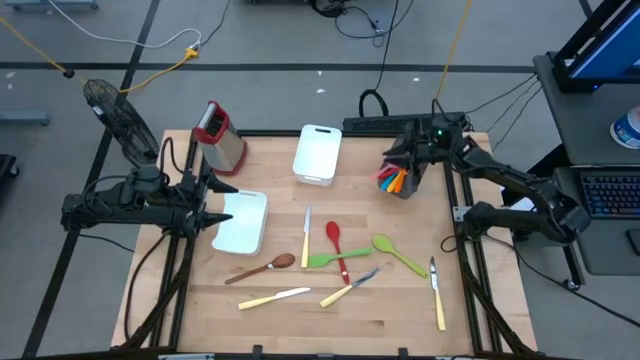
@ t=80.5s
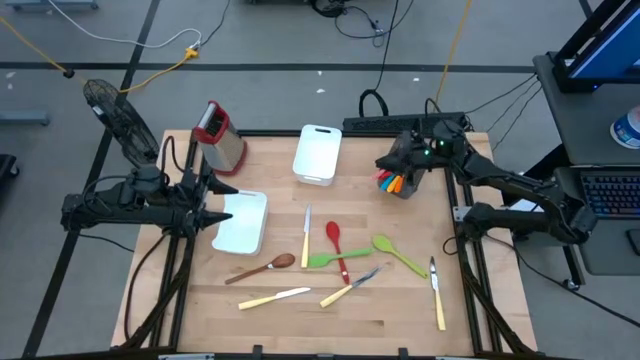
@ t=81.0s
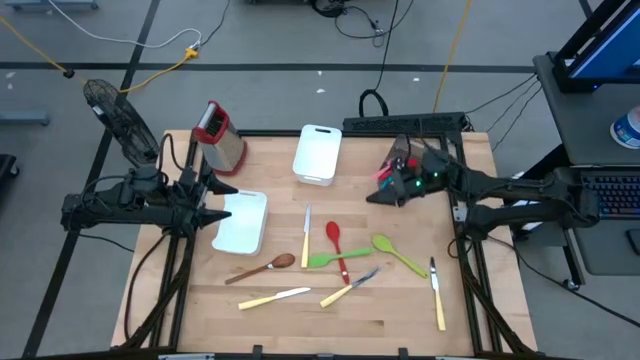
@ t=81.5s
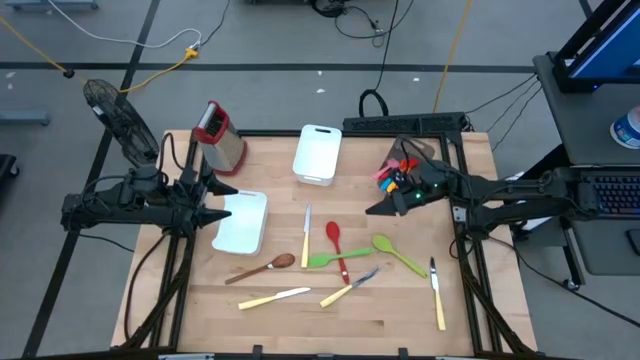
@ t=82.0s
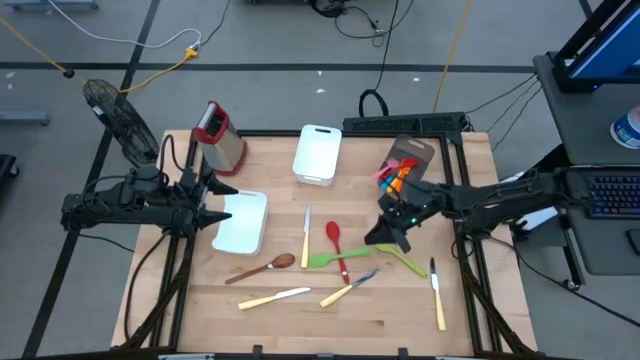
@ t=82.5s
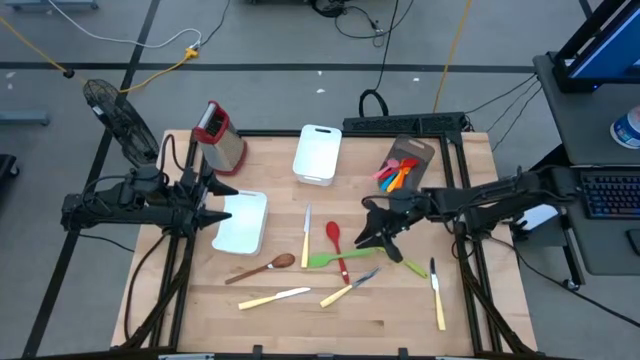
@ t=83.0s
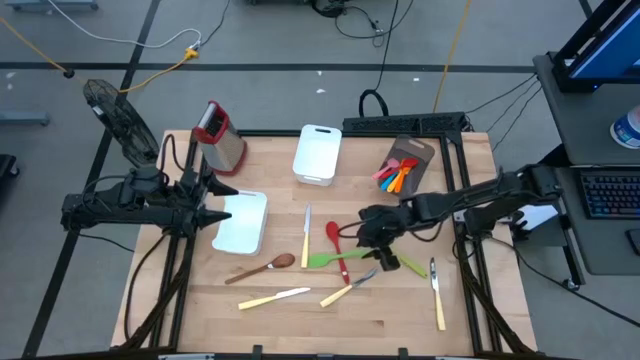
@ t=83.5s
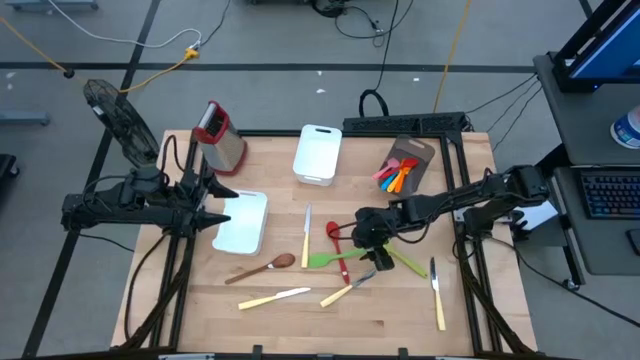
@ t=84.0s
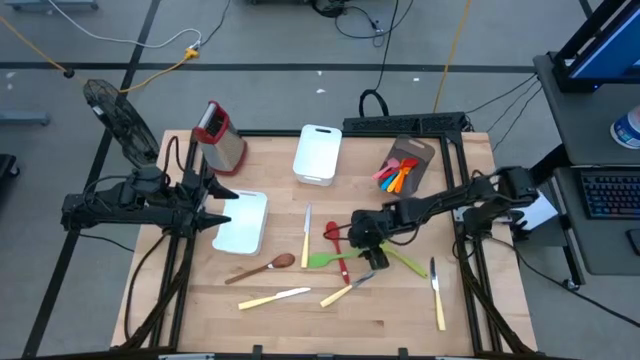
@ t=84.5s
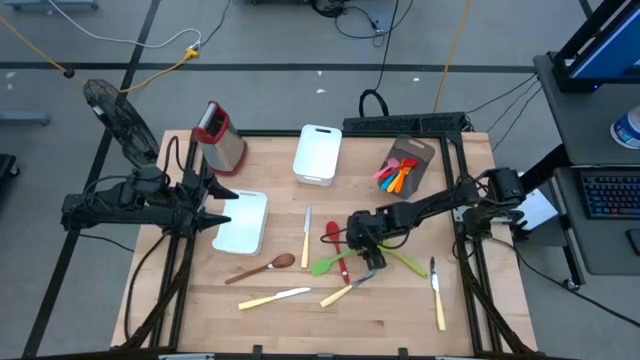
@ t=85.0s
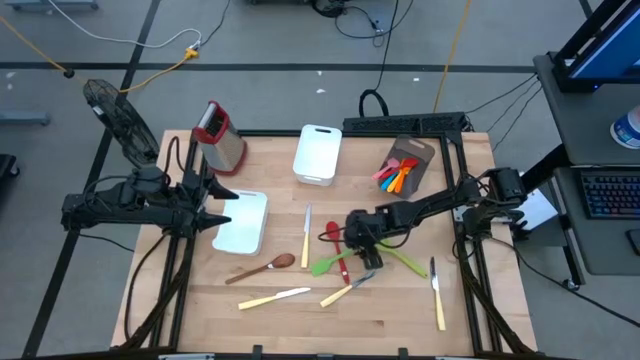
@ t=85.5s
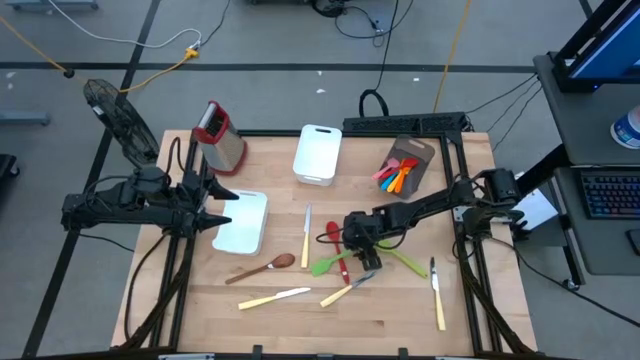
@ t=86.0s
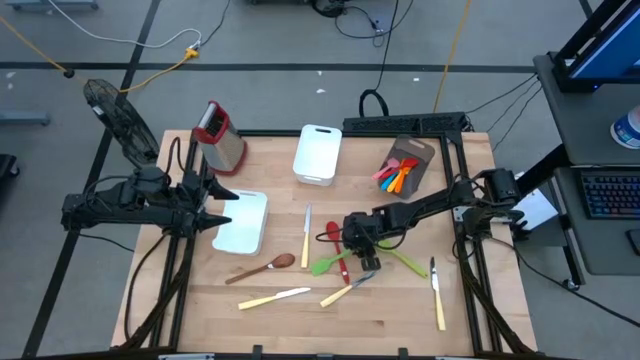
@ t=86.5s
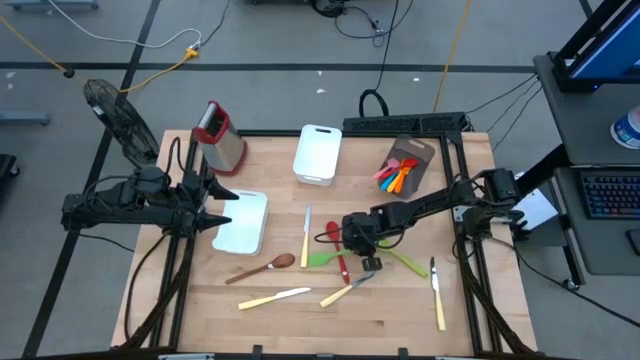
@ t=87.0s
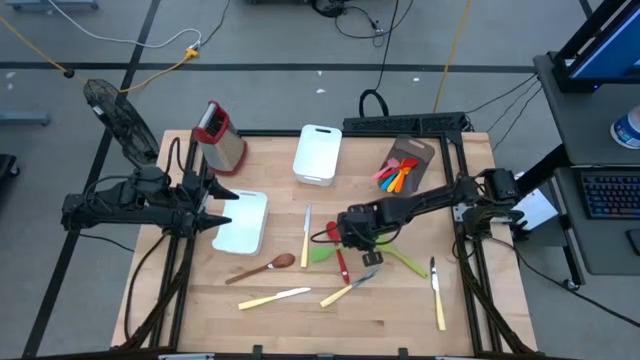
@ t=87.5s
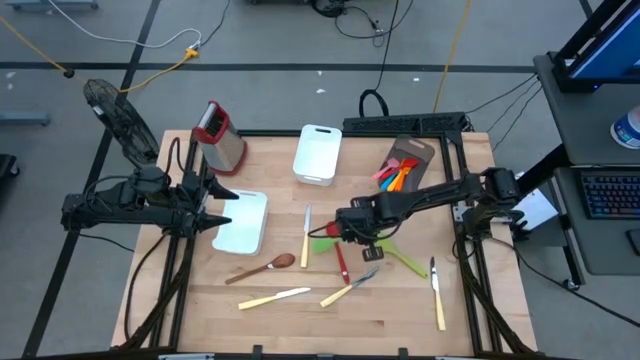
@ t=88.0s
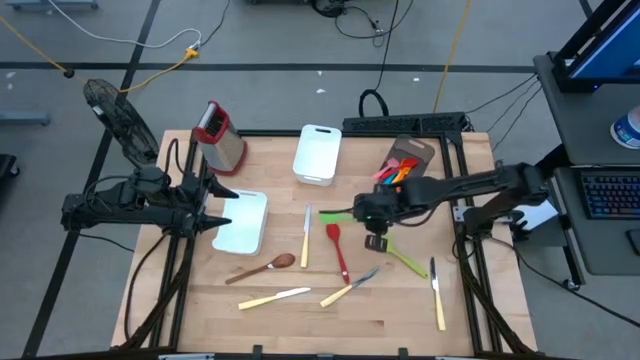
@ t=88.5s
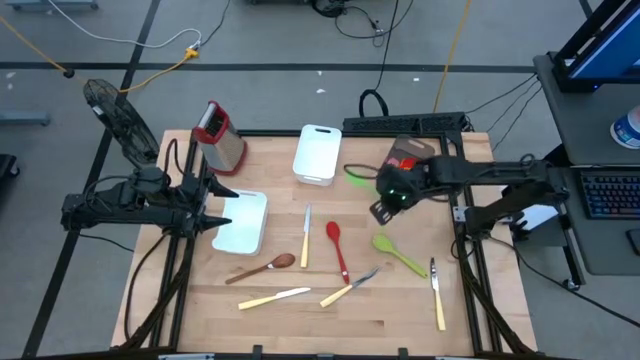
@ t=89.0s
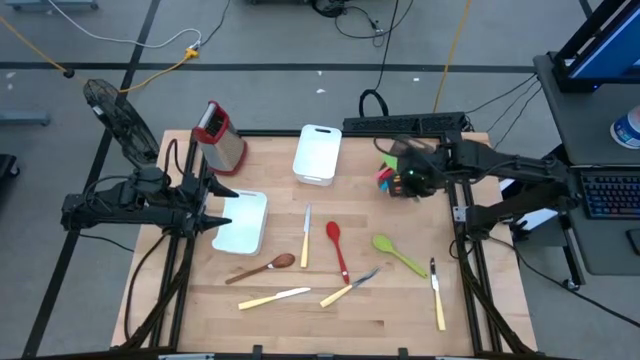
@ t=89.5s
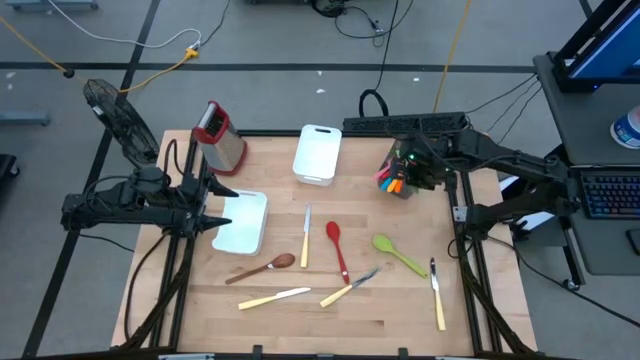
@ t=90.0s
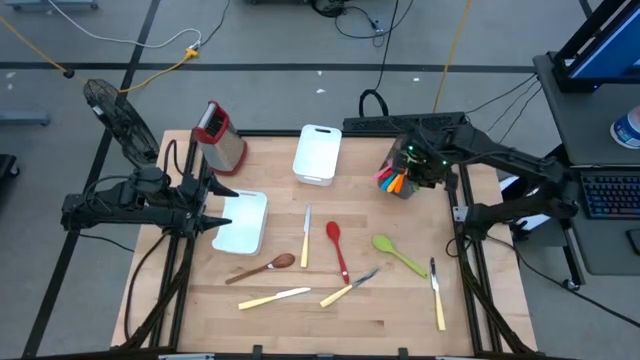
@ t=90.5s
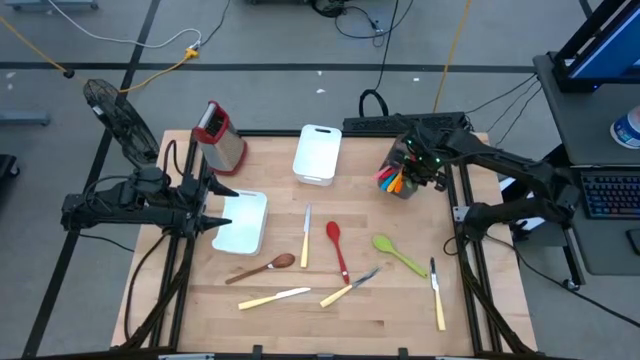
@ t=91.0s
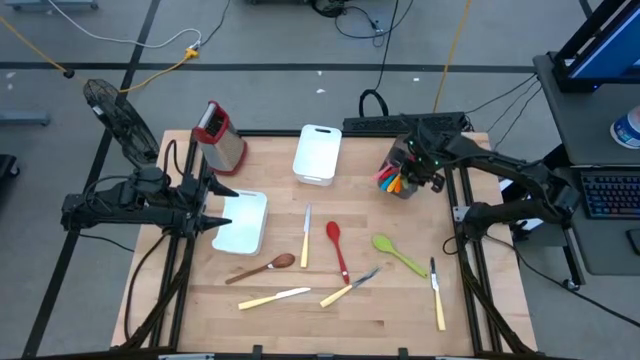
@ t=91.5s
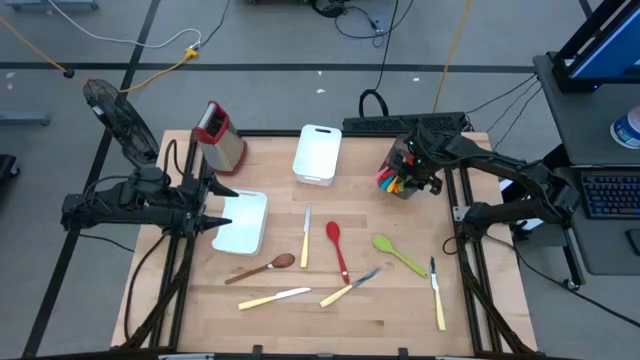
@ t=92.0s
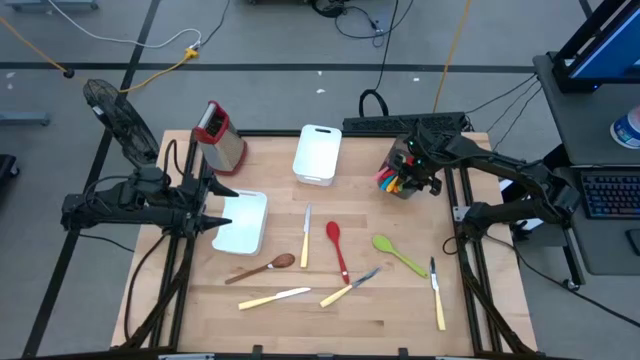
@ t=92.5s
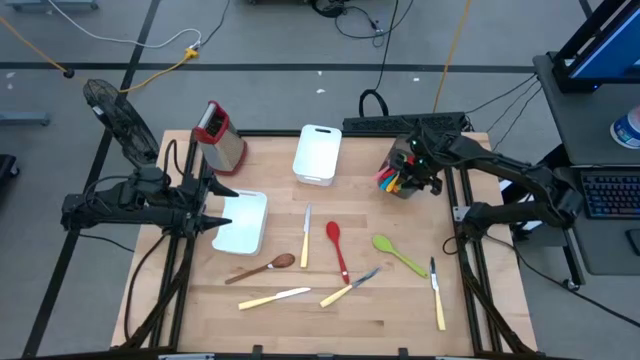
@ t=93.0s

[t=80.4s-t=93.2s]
Task: Pick & Place Kitchen Items
Put the green spatula into the black bin

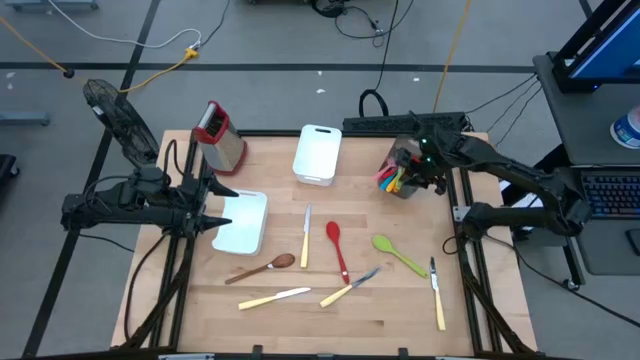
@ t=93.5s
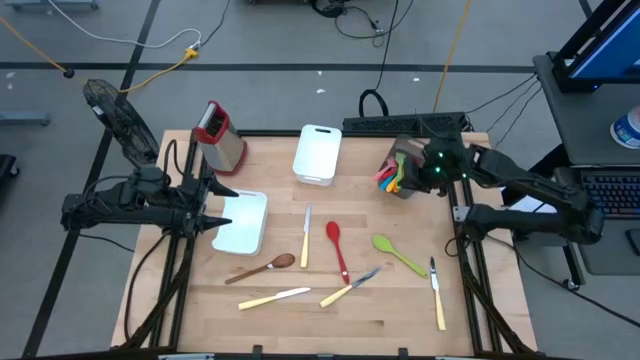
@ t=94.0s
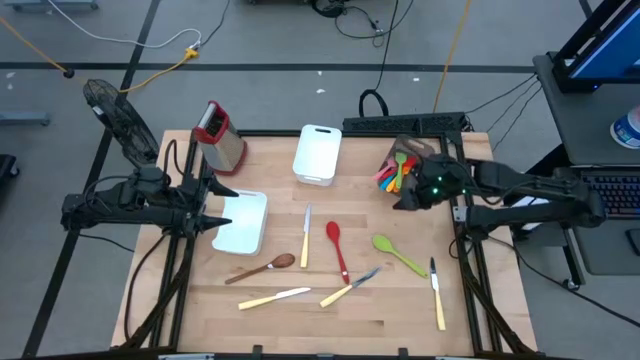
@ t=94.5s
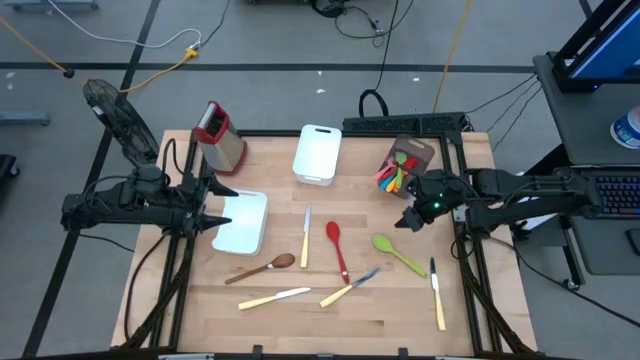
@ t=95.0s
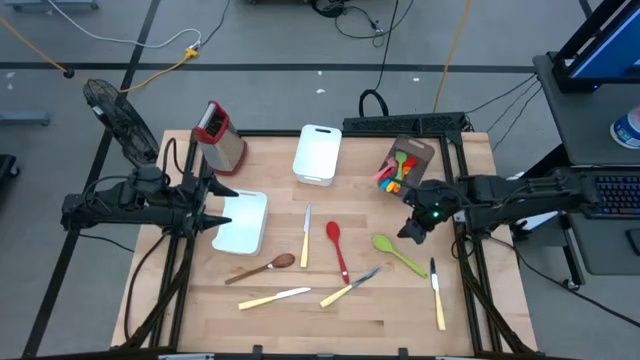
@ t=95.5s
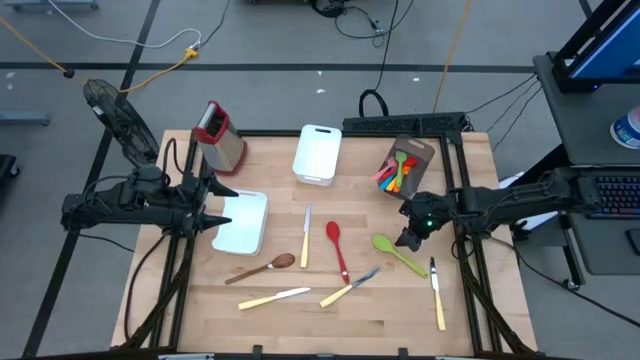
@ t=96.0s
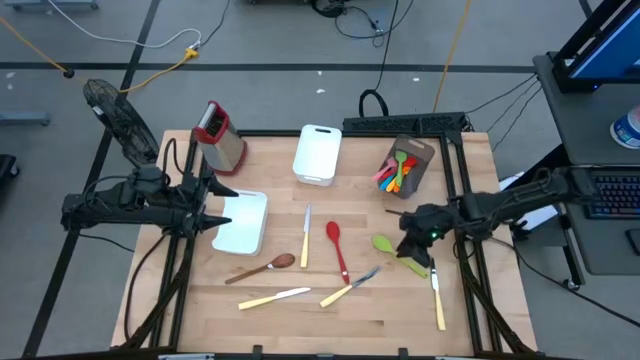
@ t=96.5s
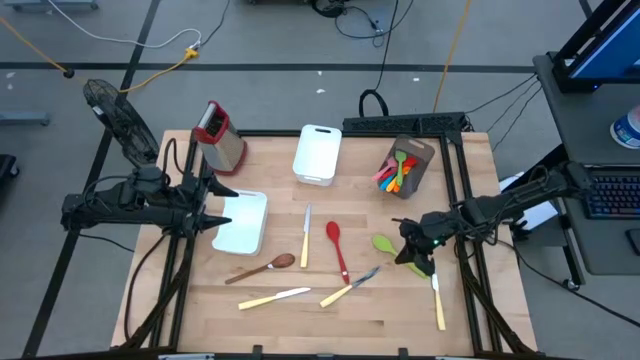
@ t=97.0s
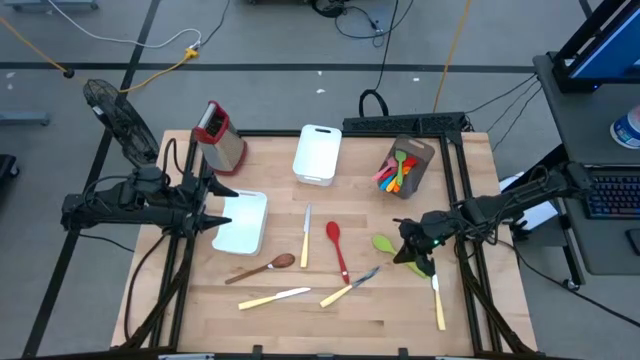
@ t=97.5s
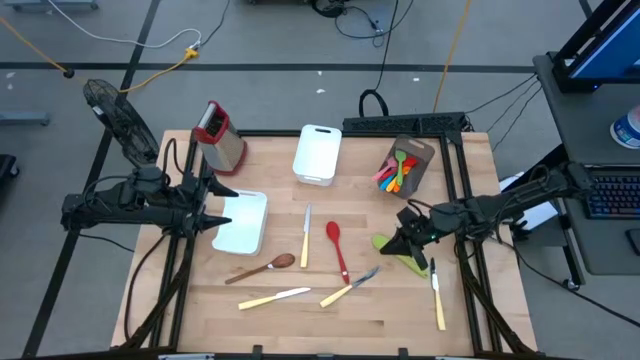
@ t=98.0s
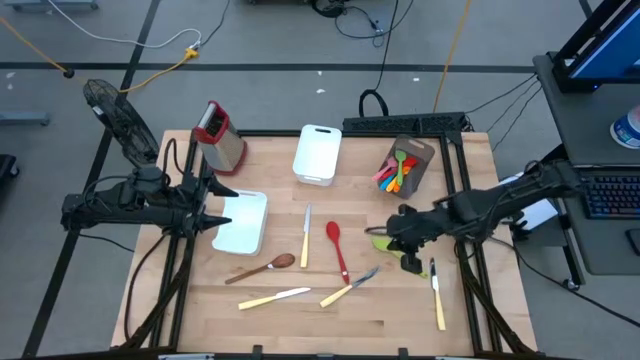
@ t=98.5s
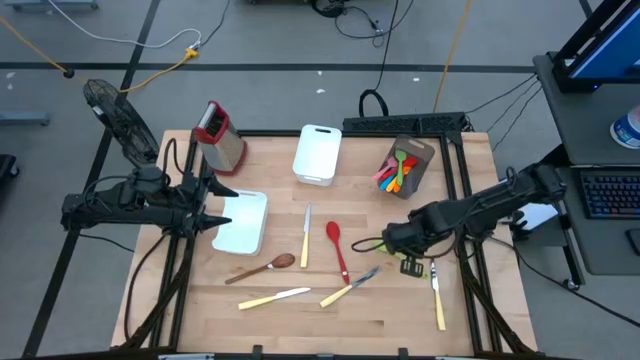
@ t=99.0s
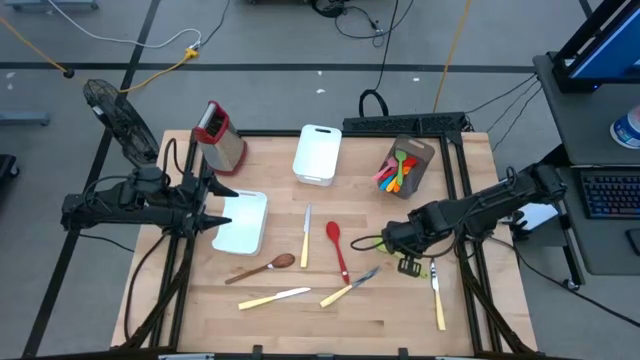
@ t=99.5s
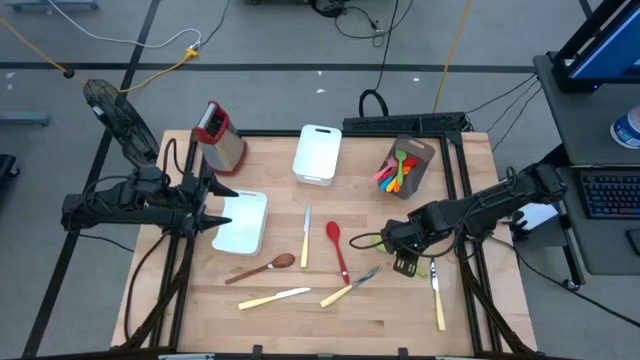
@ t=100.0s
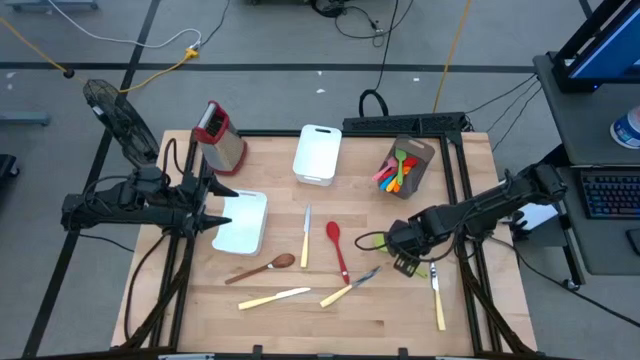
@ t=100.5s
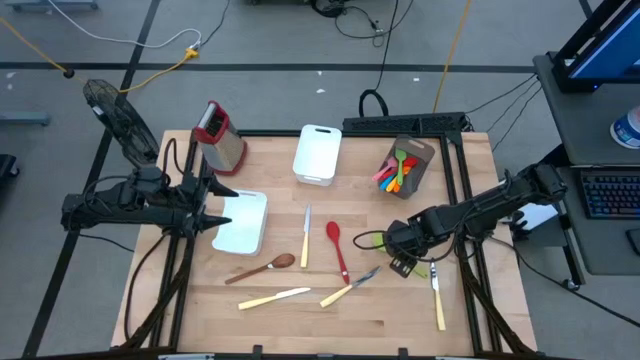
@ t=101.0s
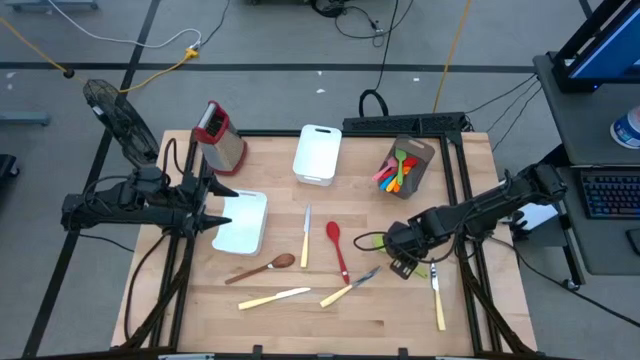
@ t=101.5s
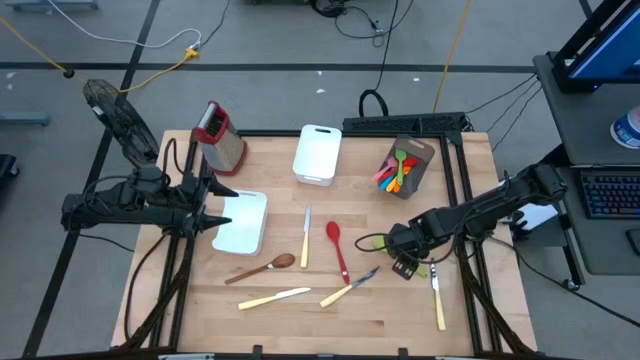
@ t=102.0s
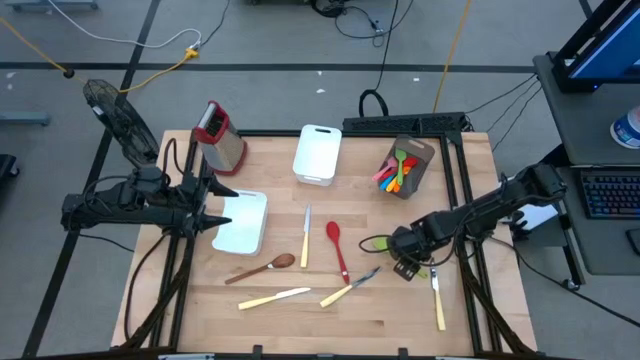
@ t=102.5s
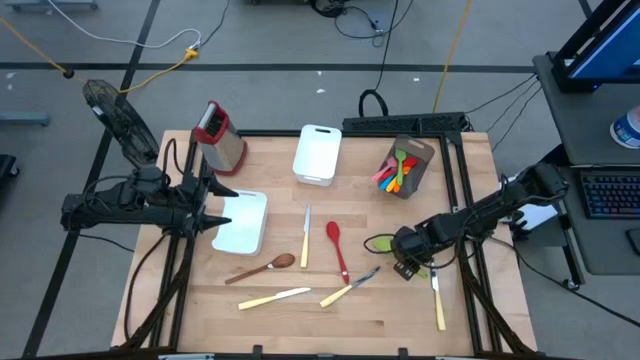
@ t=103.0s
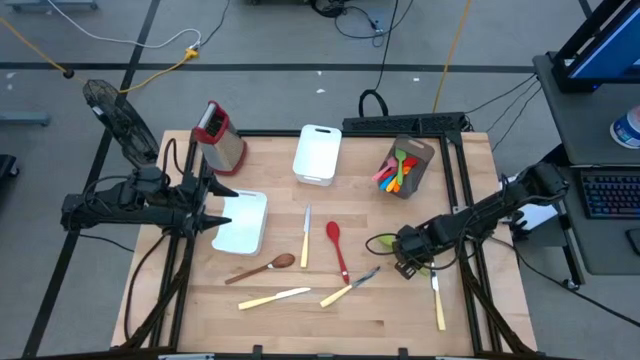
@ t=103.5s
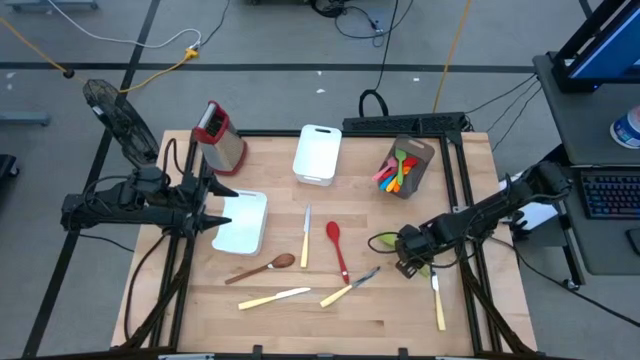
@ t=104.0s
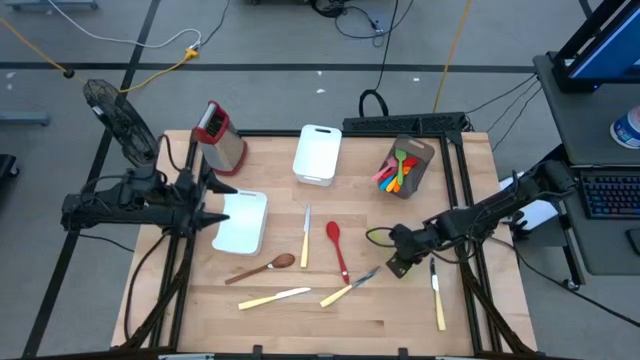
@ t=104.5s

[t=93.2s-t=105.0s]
Put the light green serving spoon into the top white bin
